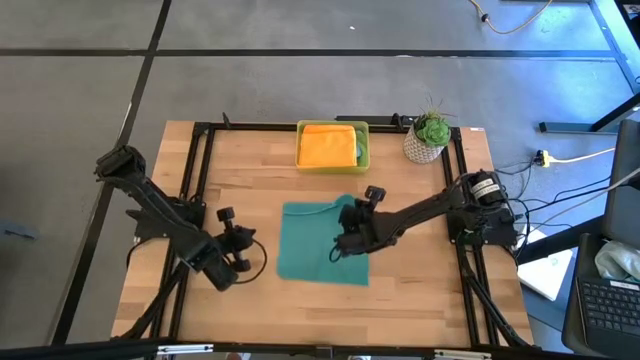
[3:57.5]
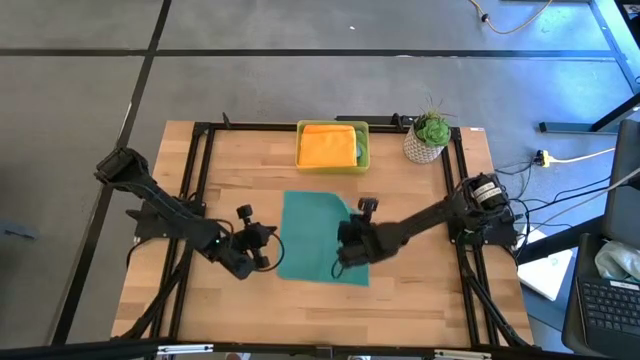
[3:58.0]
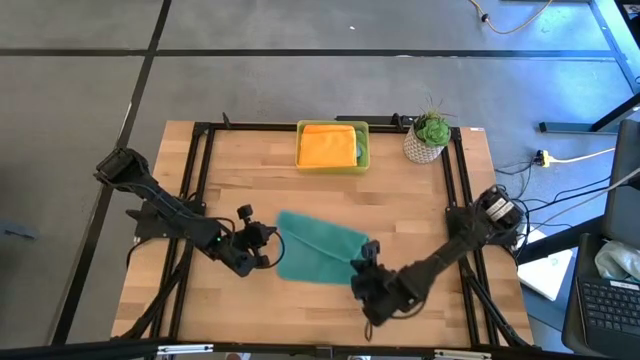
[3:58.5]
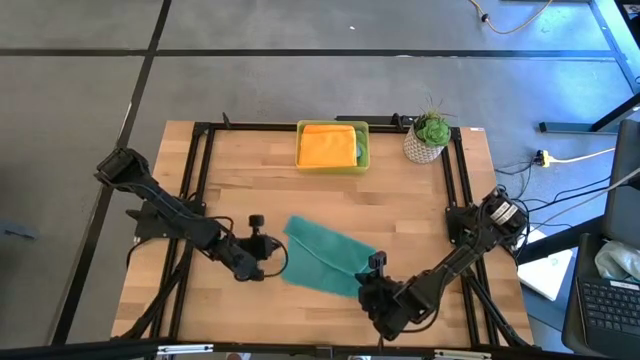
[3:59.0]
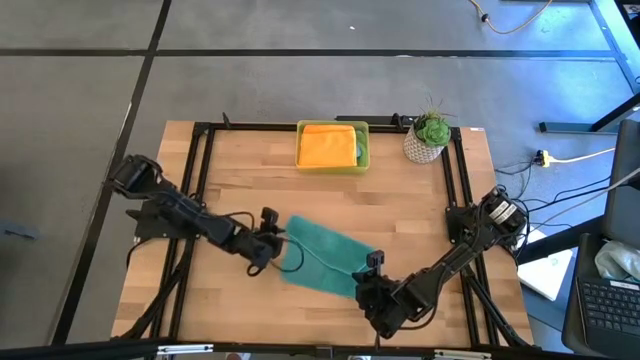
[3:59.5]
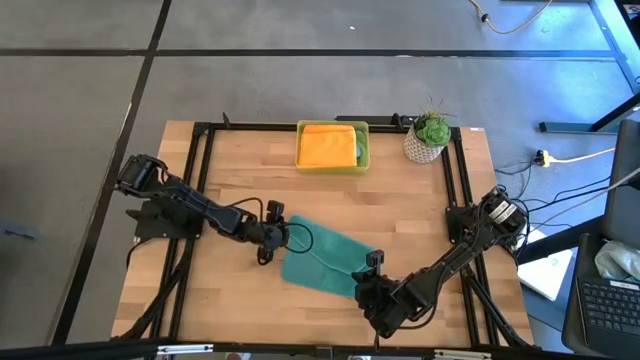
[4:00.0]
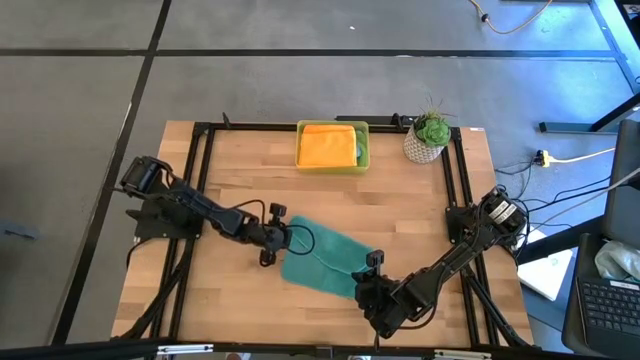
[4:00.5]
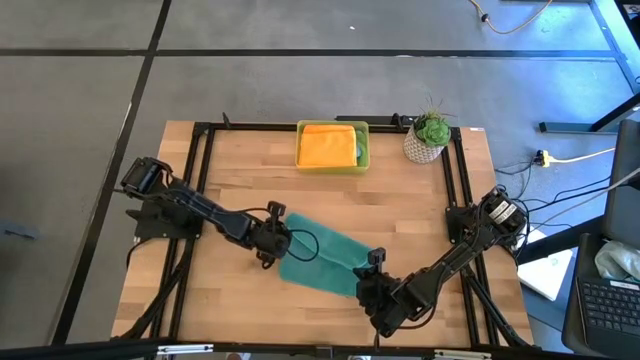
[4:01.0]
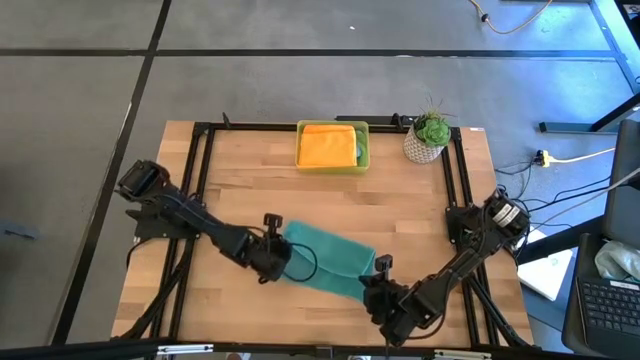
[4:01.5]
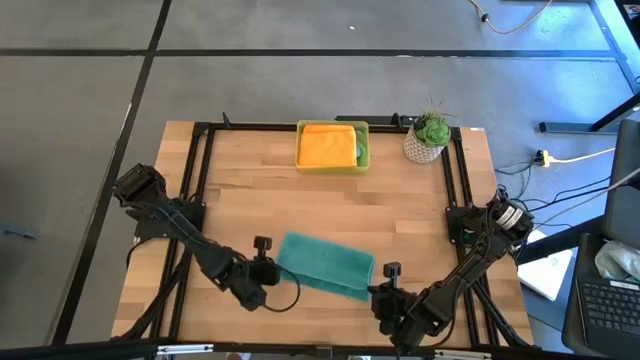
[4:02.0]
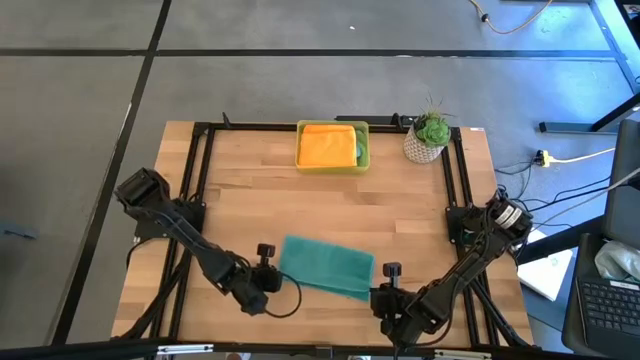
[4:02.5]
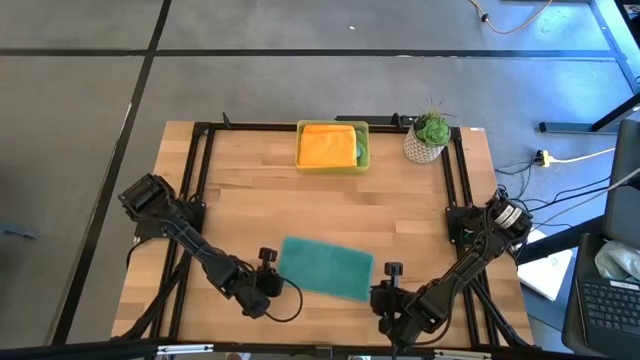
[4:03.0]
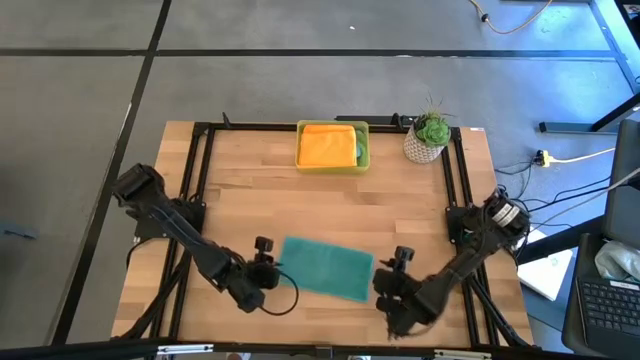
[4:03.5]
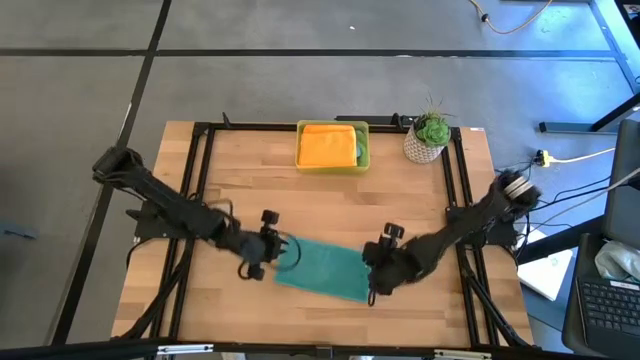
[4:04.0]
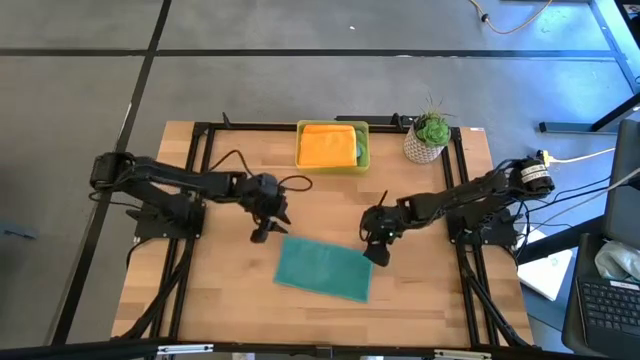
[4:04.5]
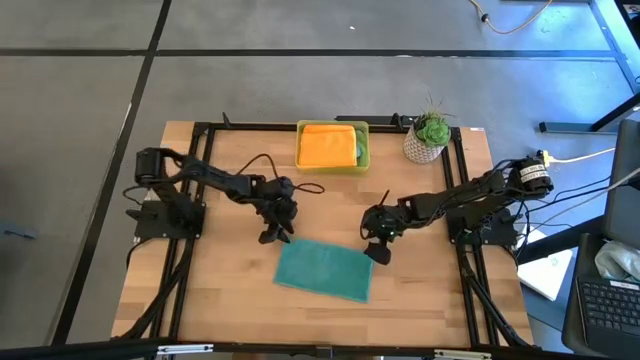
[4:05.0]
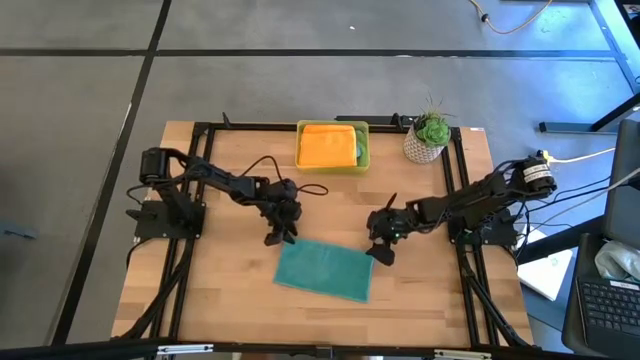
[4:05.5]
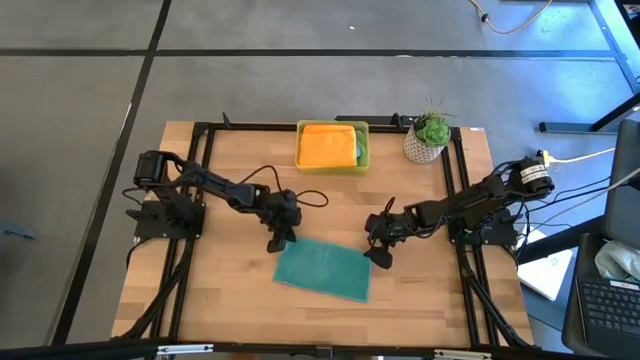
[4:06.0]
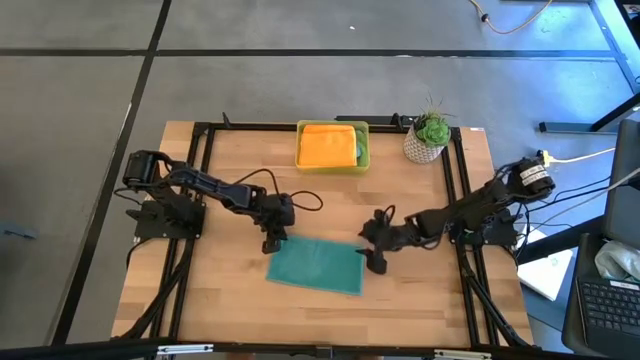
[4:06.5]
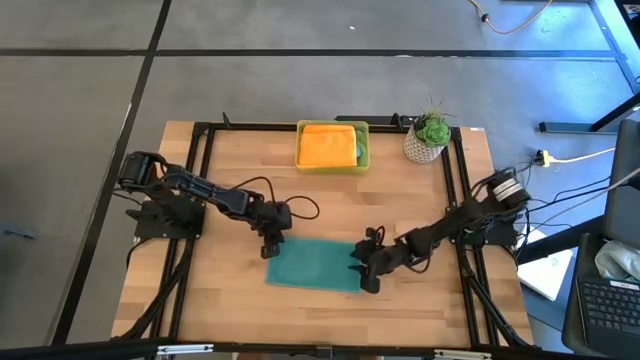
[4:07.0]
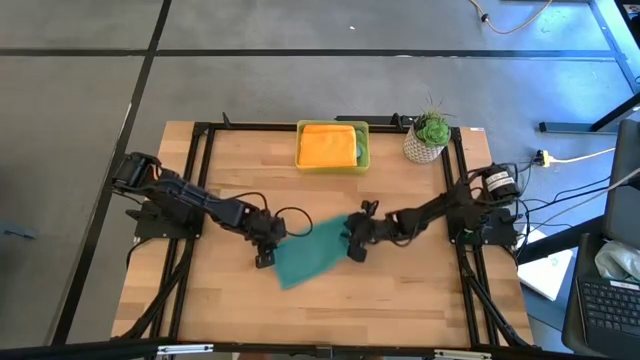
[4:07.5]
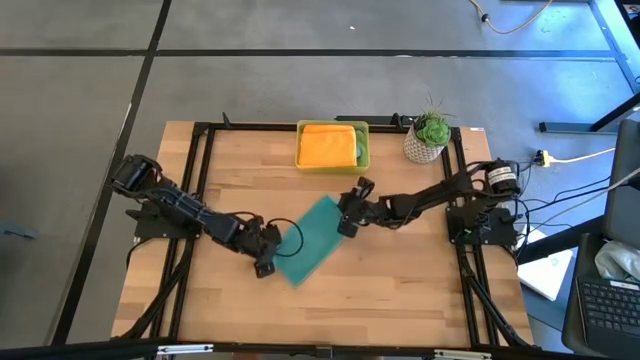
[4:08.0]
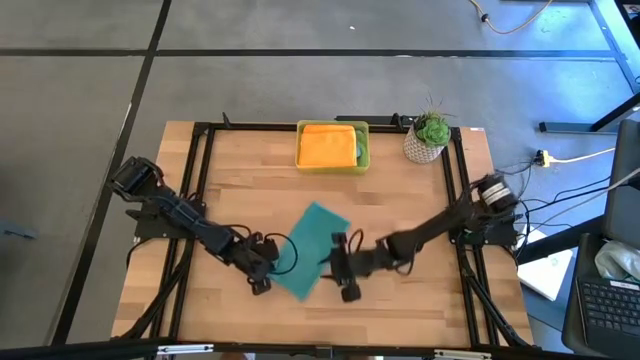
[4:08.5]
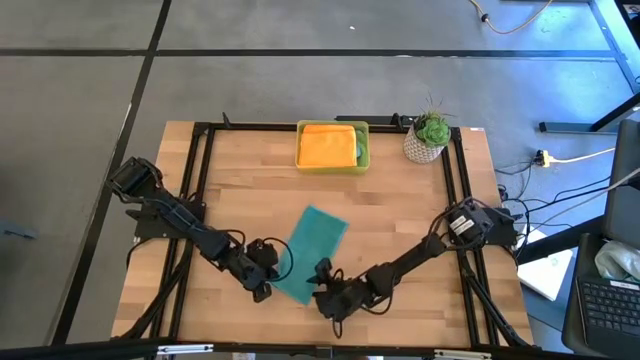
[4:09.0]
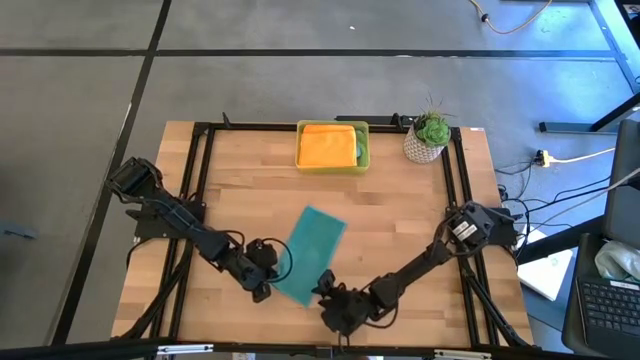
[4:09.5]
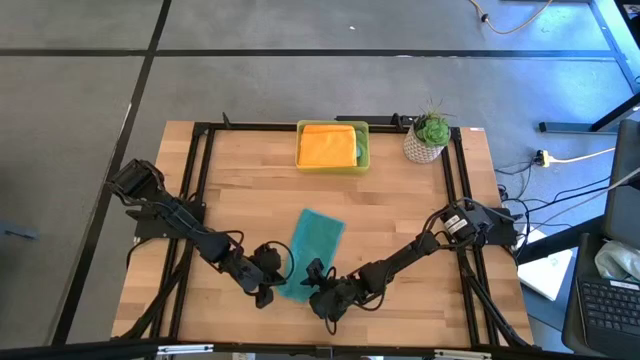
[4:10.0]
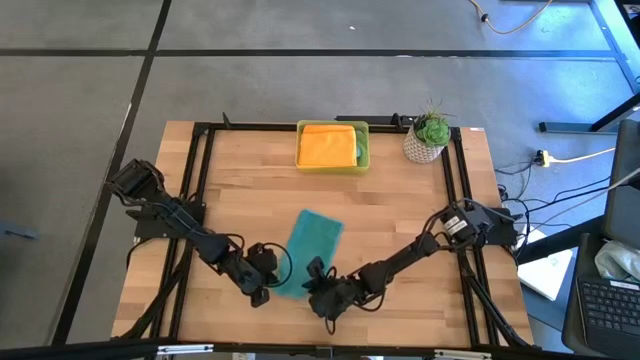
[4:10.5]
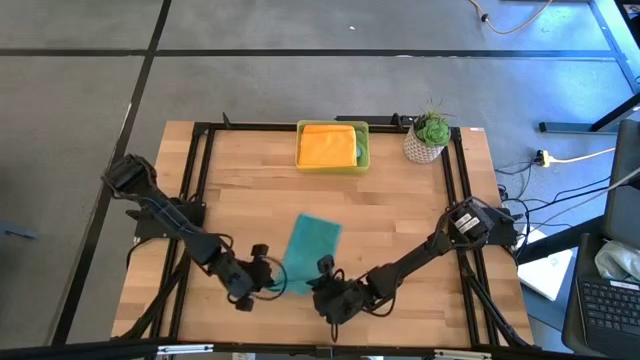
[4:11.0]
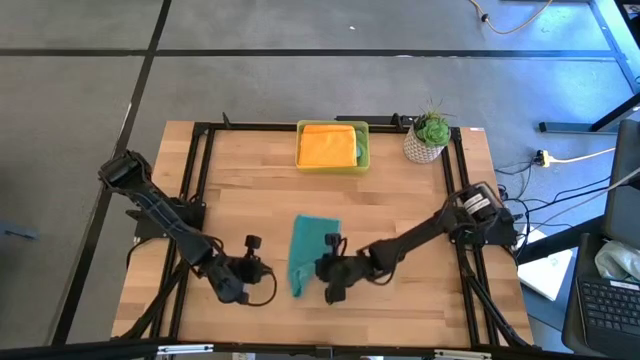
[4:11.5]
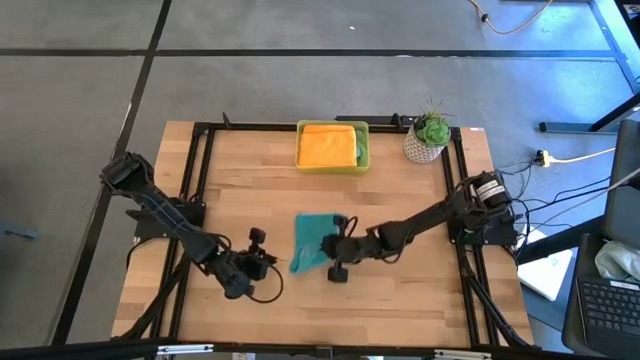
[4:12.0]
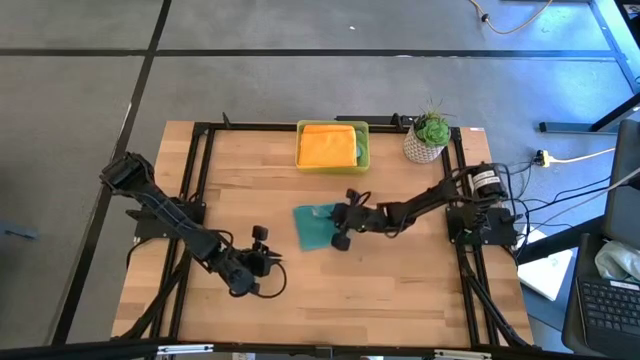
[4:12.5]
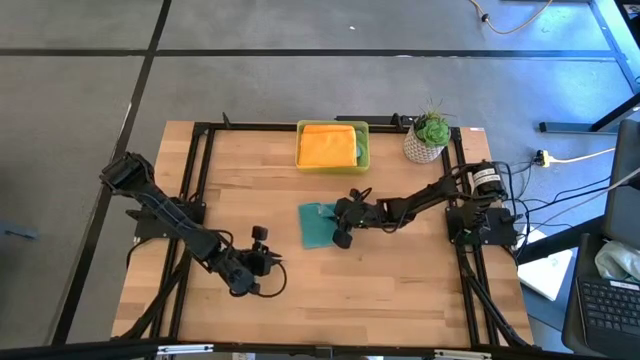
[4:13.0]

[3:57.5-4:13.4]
Task: Fold microfiber towels
Fold the blue cloth

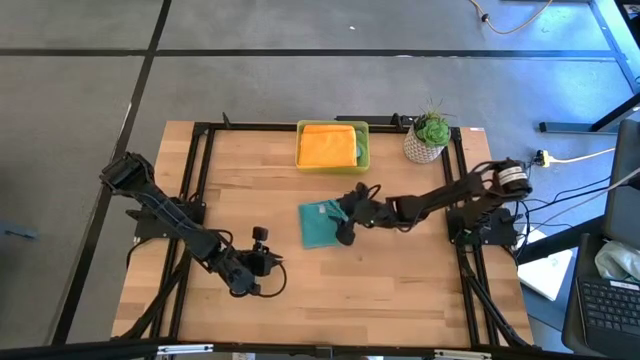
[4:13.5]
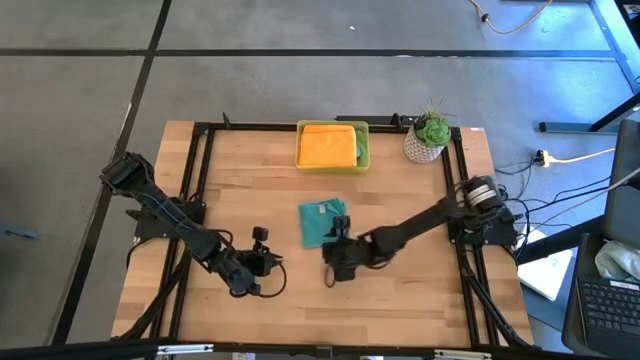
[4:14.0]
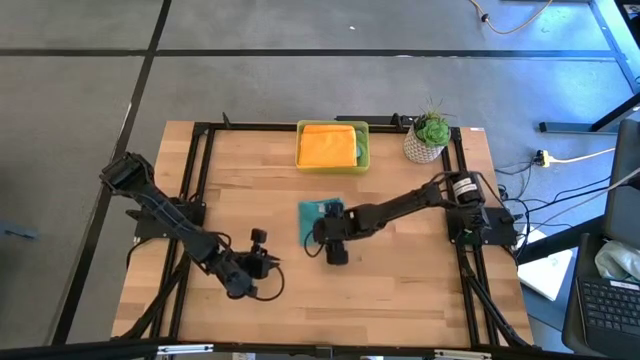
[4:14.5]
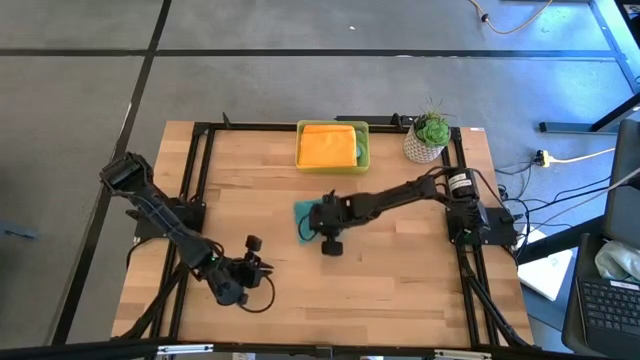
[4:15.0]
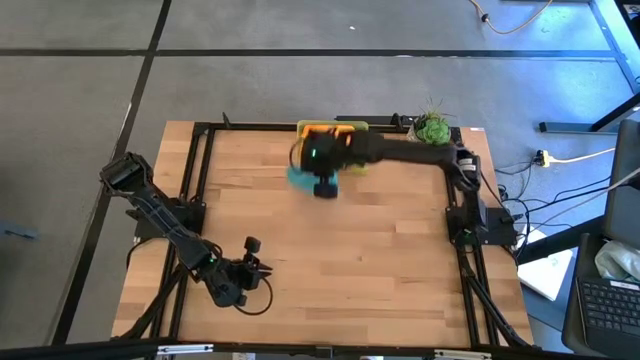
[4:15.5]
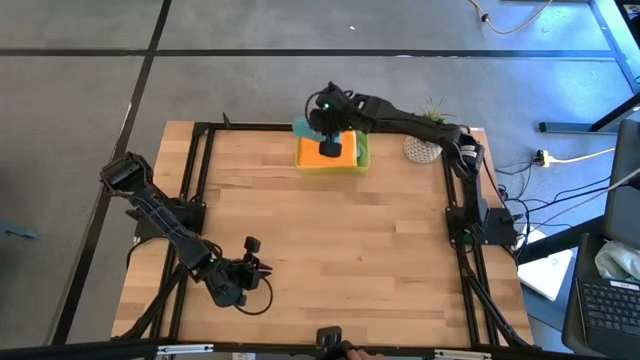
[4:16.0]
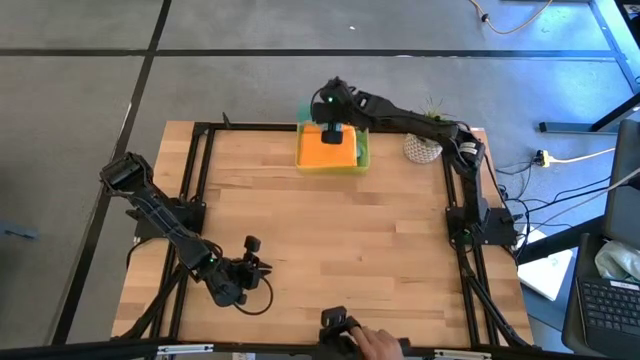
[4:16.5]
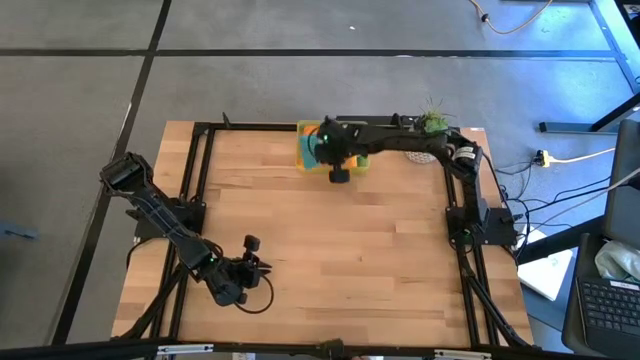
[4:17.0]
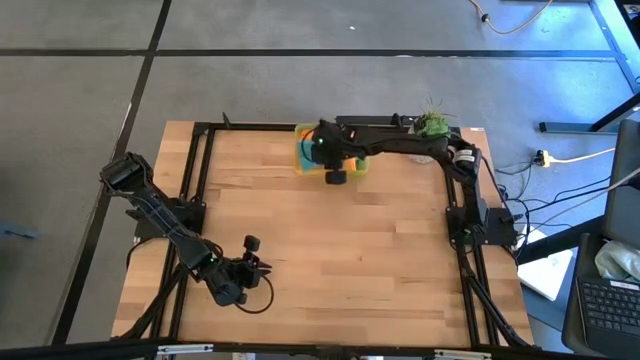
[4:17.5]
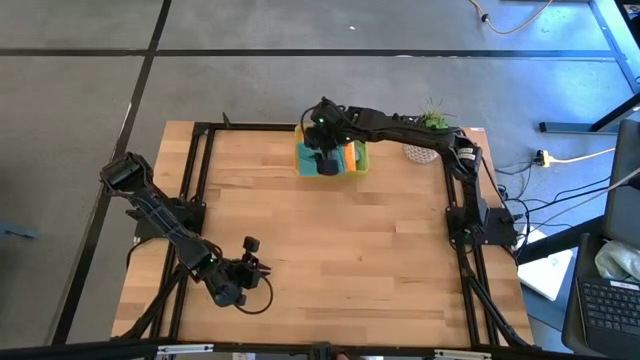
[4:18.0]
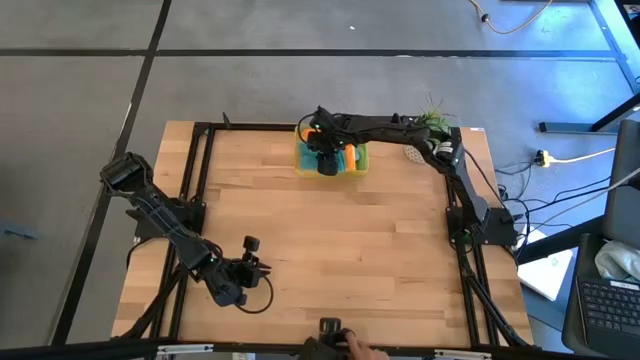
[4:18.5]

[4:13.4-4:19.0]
Put the blue folded cloth into the yellow bin
